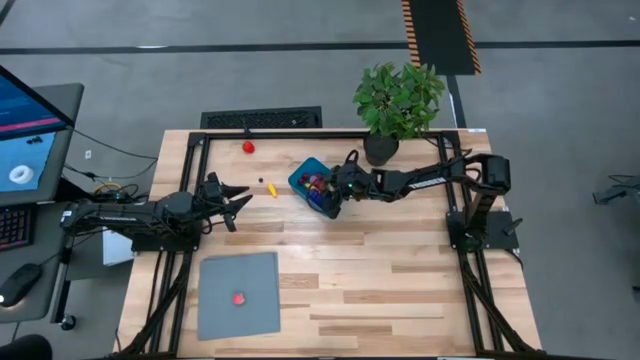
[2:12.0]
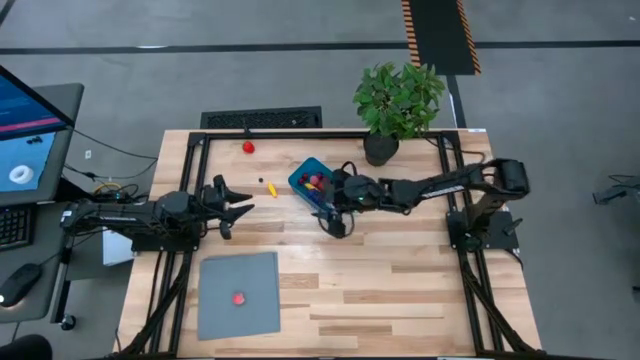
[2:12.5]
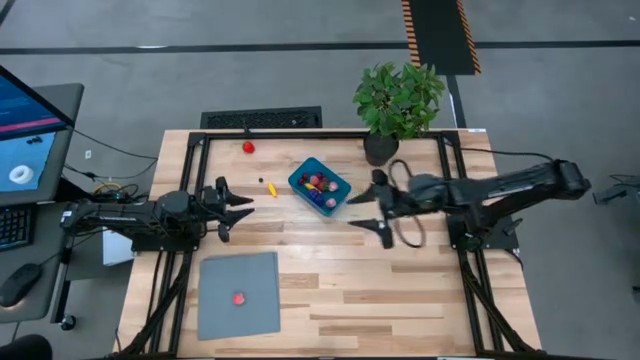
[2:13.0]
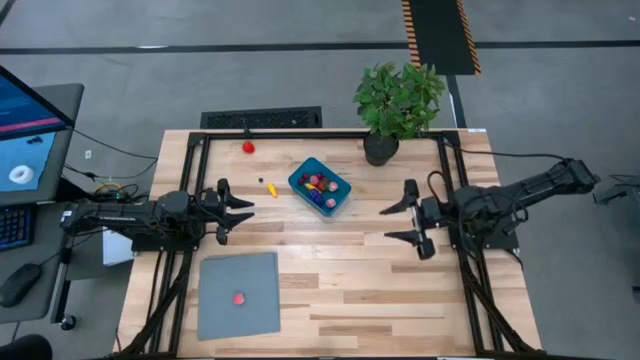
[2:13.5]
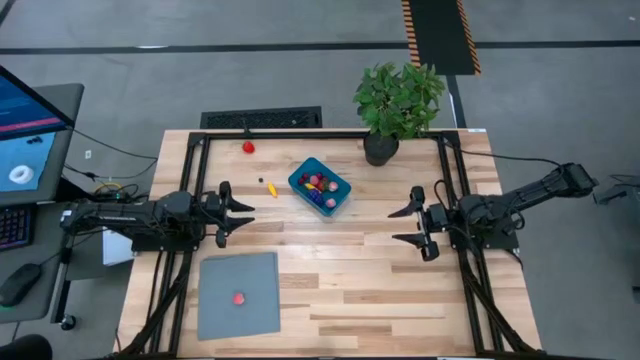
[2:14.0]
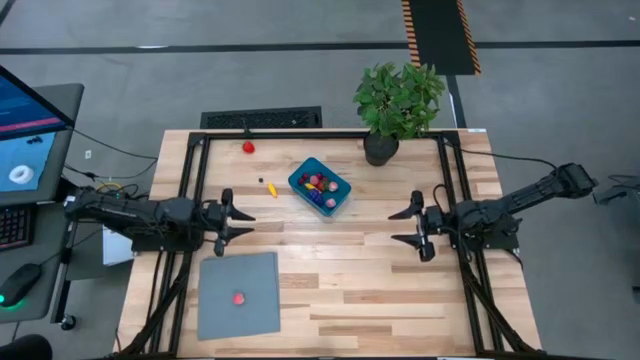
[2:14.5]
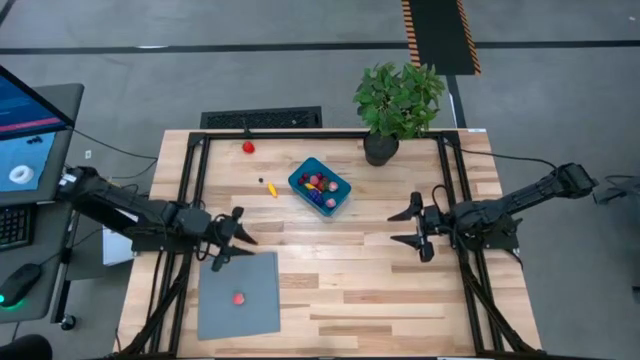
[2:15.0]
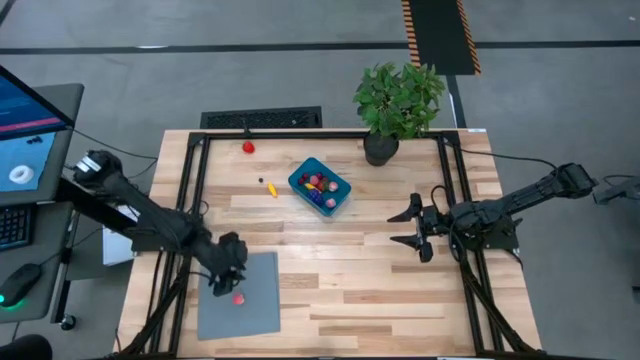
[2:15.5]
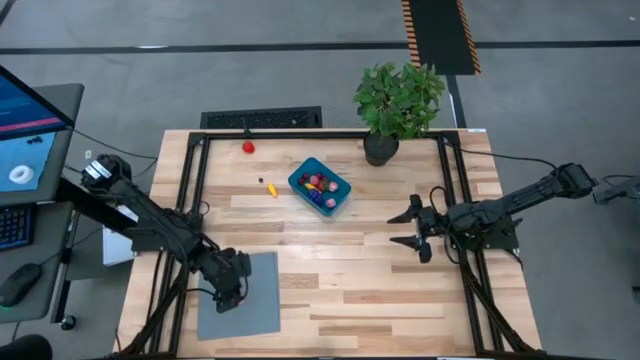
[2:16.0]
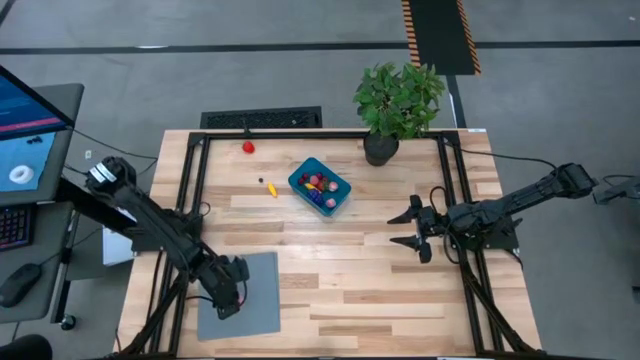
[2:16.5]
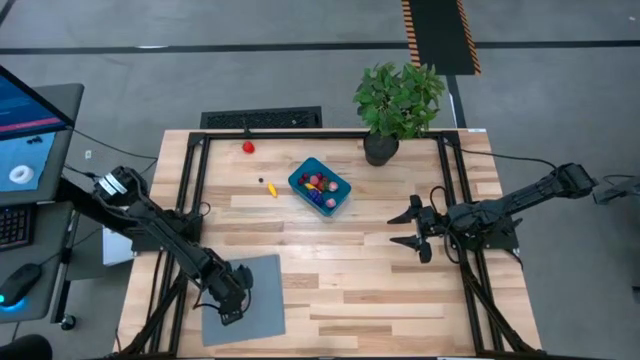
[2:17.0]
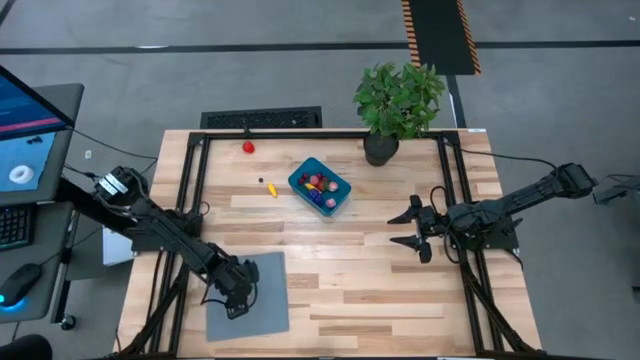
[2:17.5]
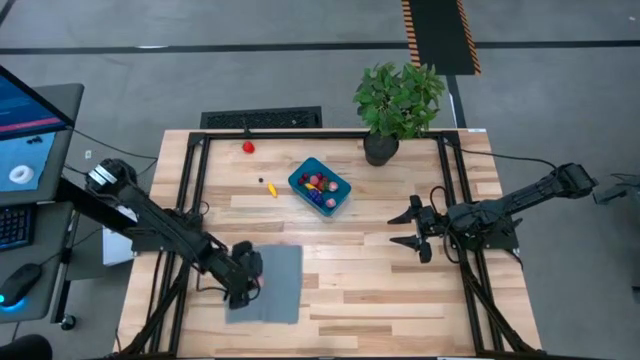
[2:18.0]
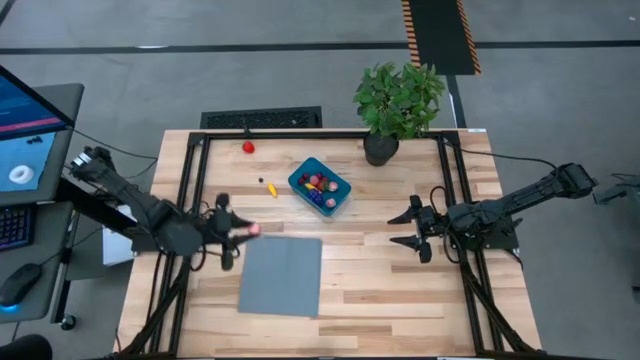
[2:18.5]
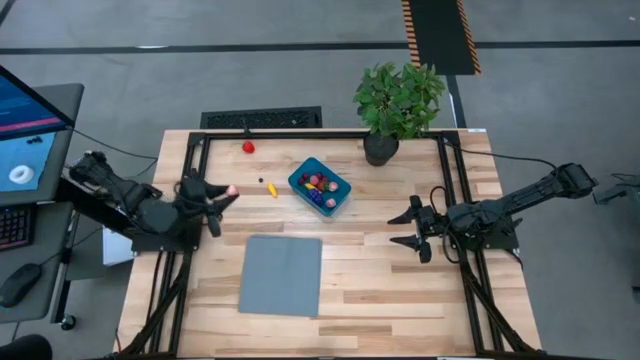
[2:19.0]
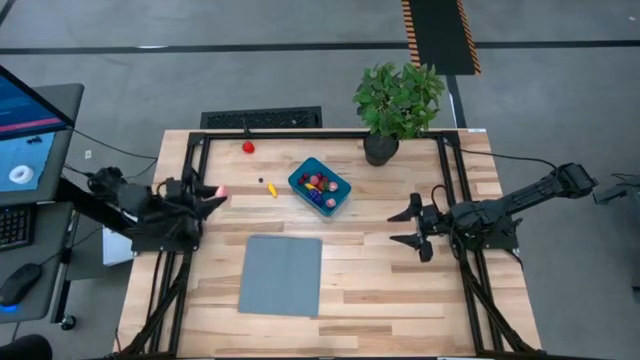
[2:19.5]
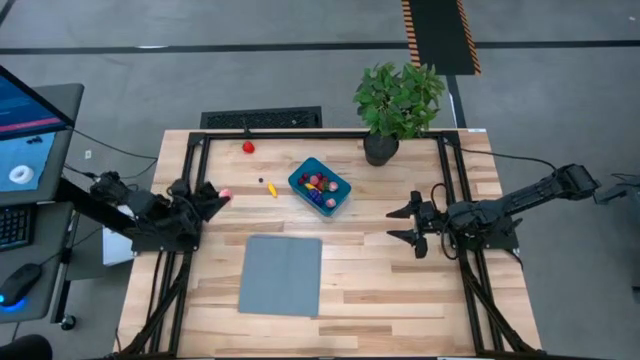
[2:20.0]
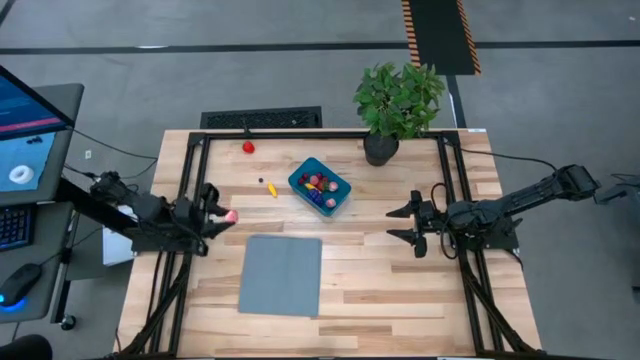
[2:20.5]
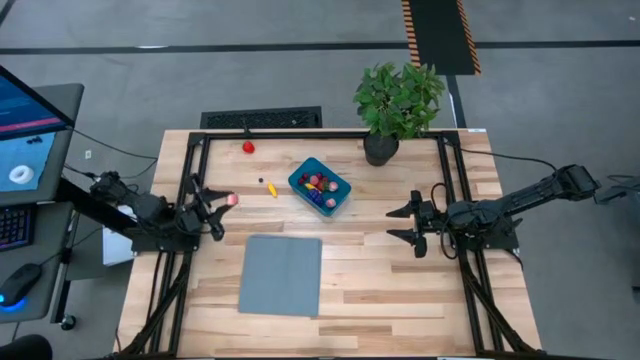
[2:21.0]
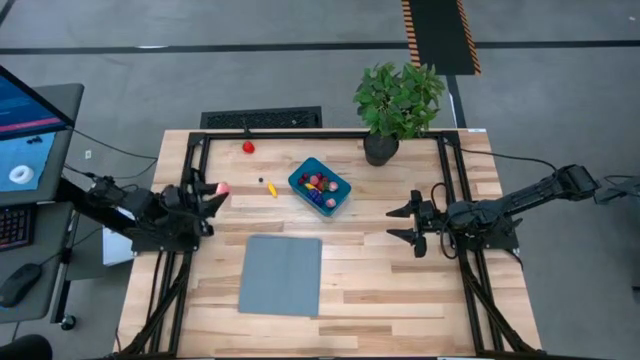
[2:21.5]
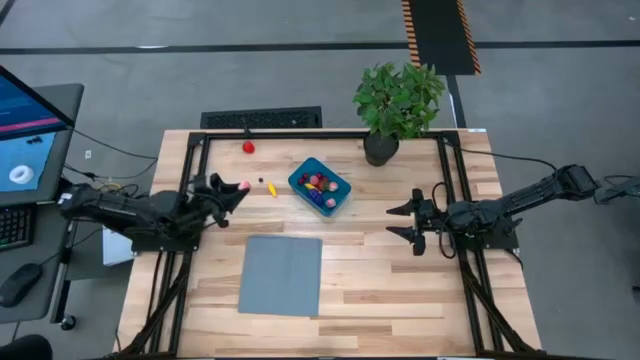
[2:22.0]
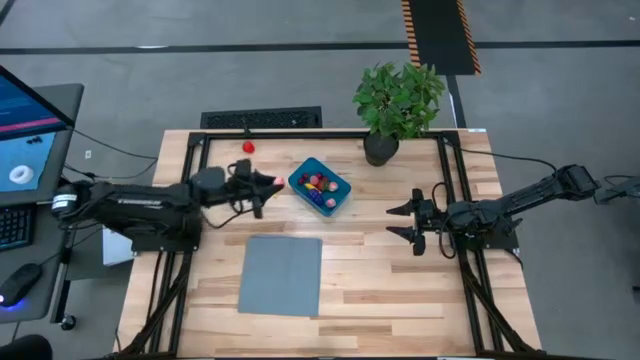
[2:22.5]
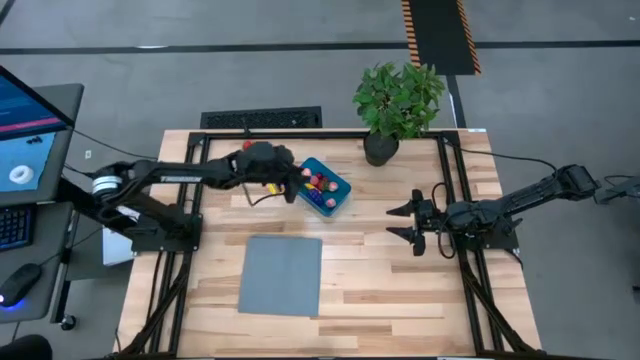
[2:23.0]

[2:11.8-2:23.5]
Task: Pick and placing Produce into tupperware
Put the apricot into the container

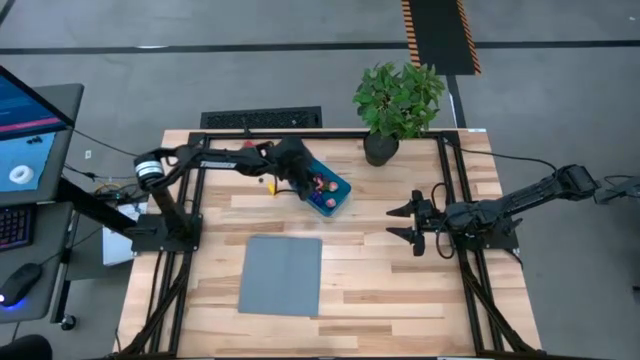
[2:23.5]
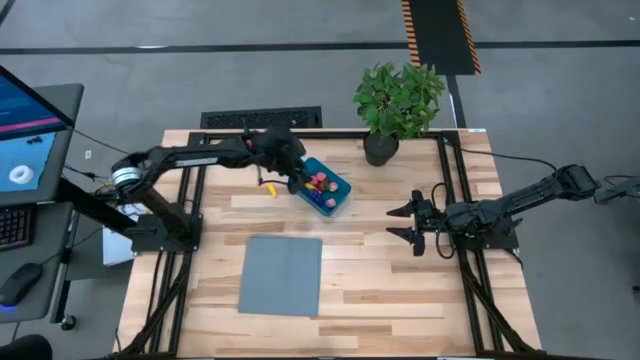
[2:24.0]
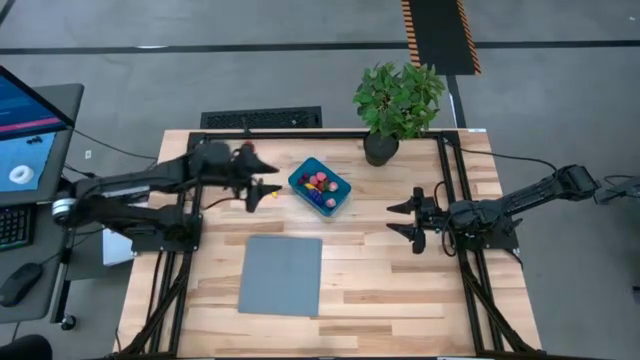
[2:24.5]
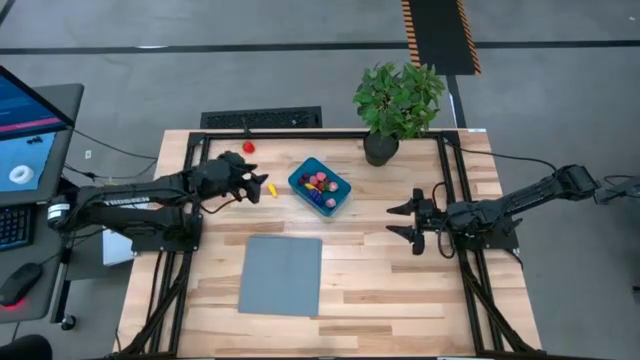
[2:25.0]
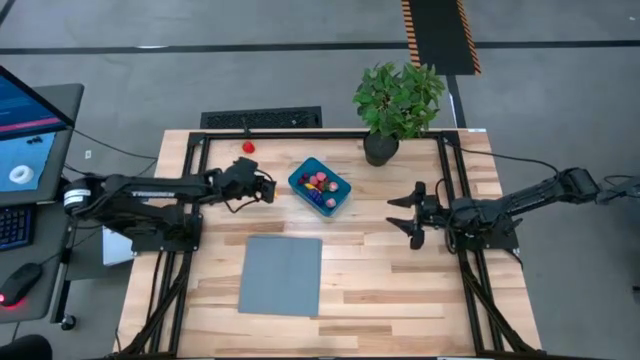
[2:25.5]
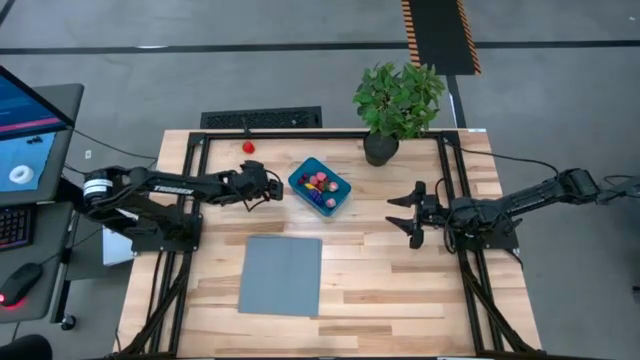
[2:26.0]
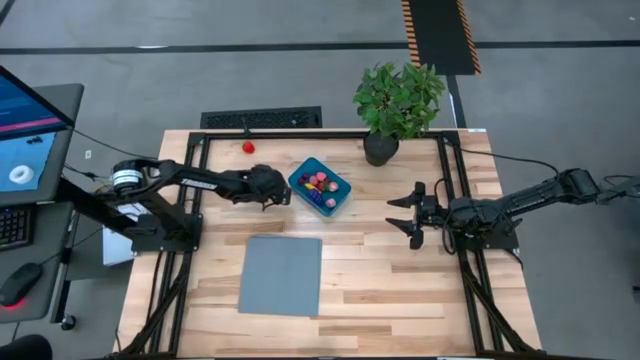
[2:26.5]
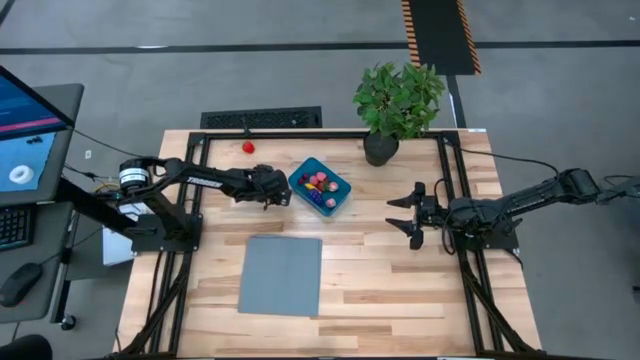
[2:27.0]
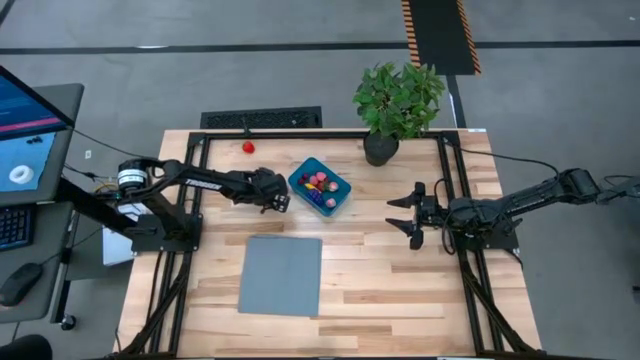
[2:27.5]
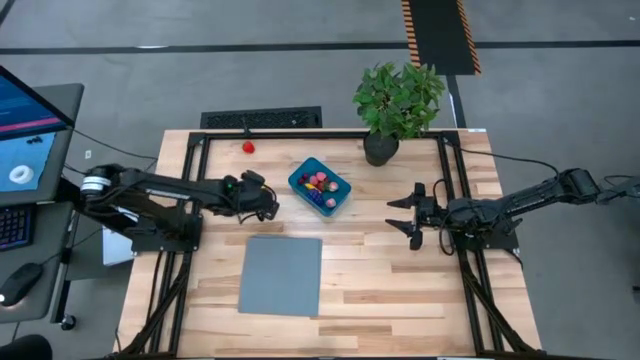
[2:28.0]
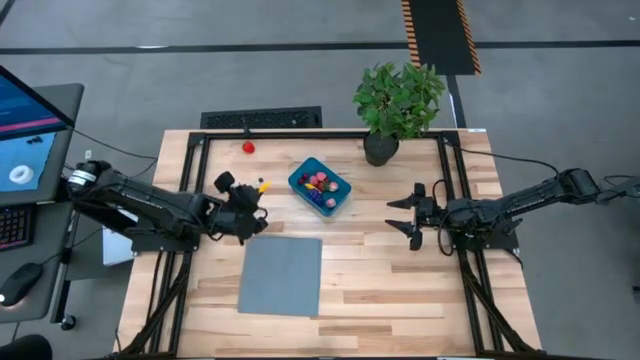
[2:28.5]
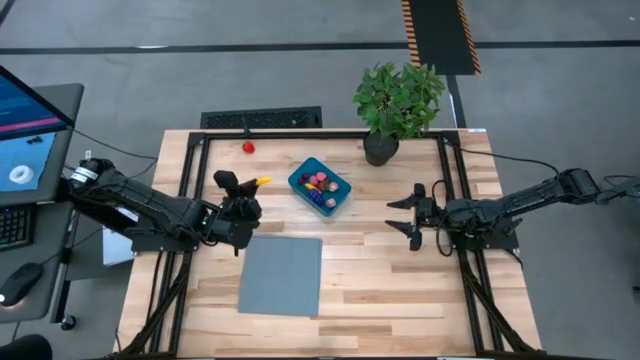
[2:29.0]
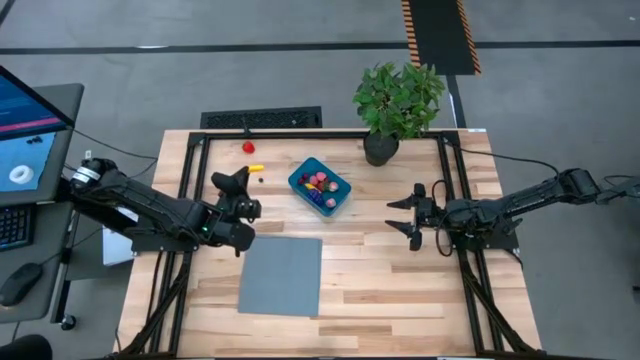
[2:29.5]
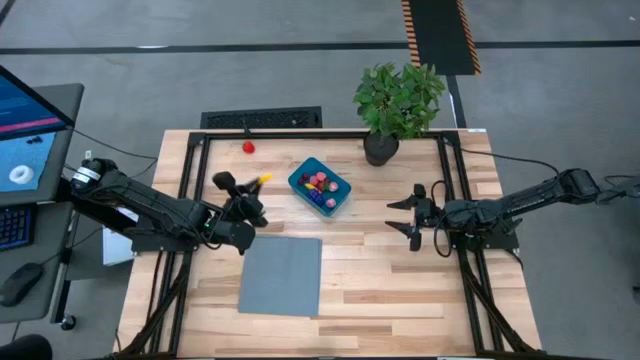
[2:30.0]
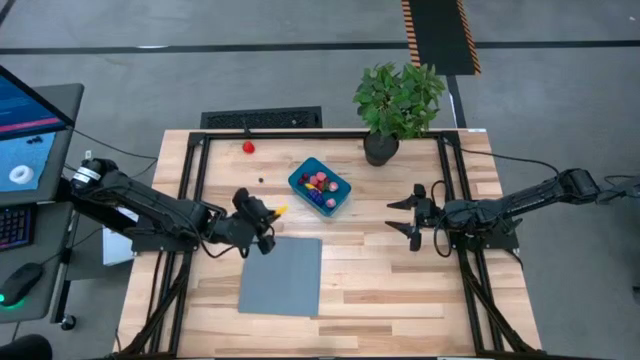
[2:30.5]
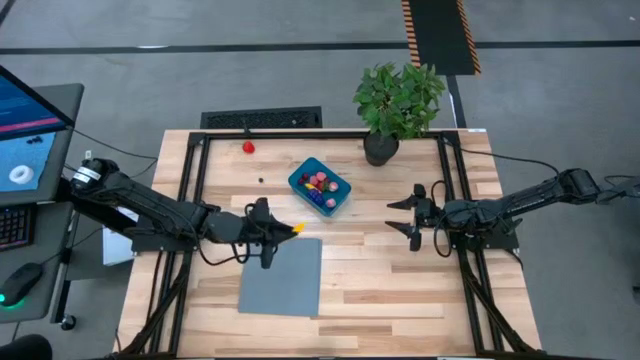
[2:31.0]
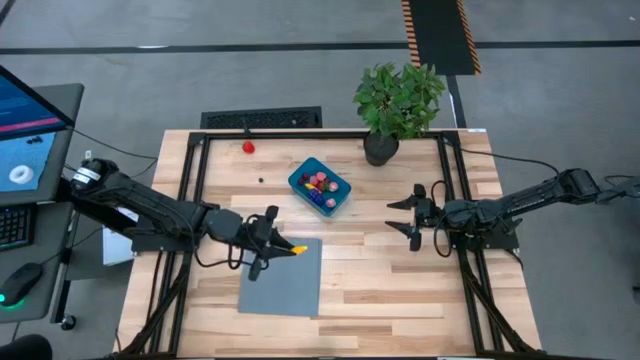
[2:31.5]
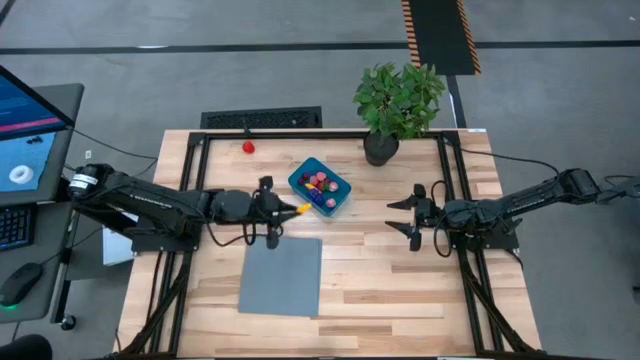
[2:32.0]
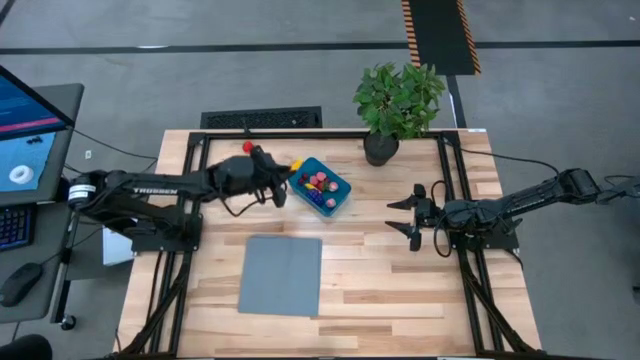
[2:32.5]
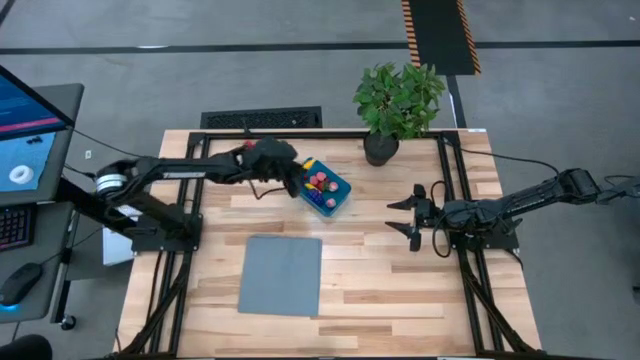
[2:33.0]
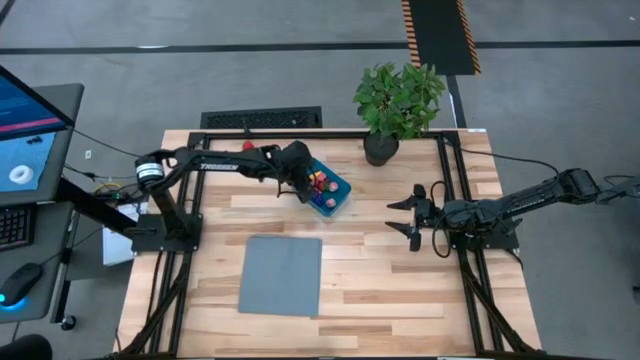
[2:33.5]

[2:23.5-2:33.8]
Put the corn into the container

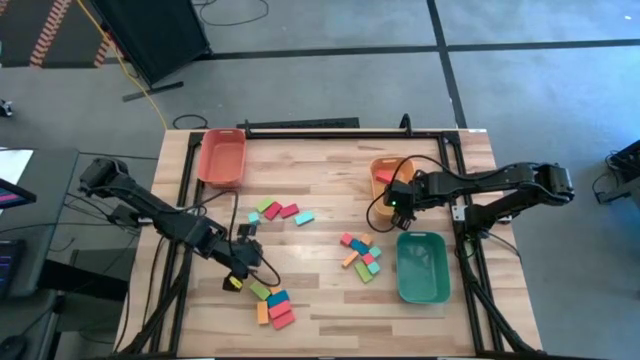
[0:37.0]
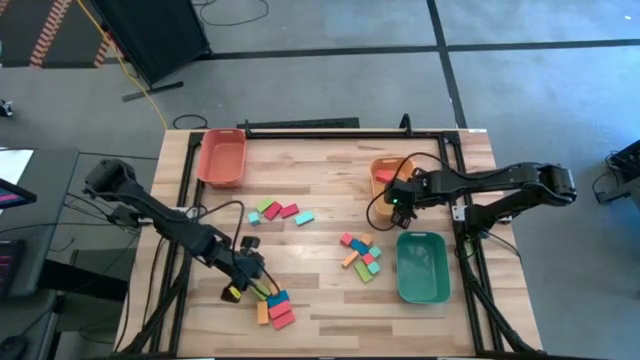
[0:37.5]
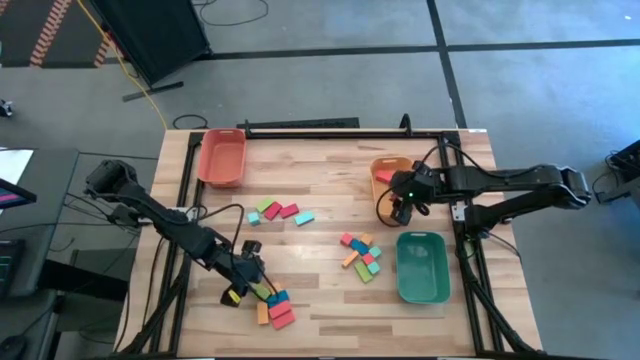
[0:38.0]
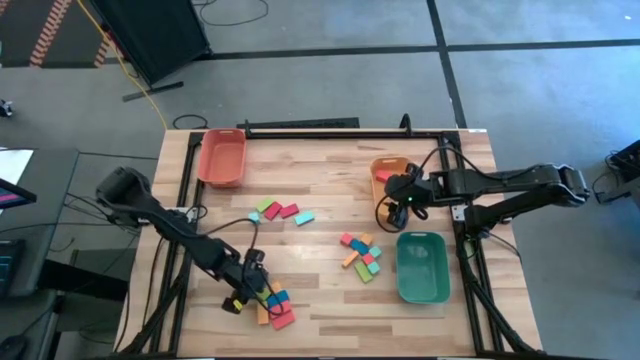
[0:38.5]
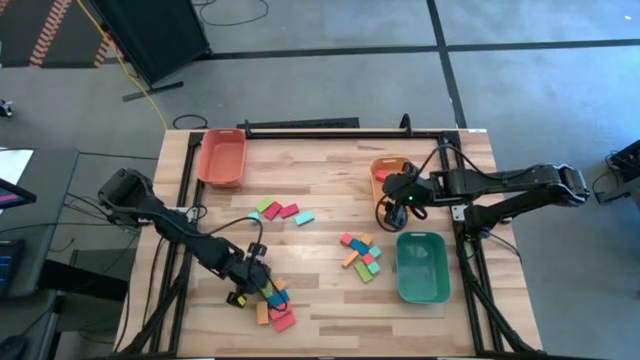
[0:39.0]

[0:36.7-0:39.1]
Task: Sort blocks by size
Put the large rectangular green block into the yellow bin
